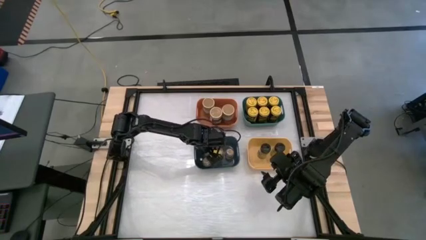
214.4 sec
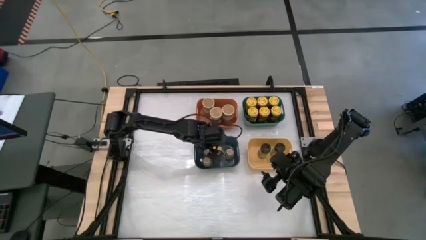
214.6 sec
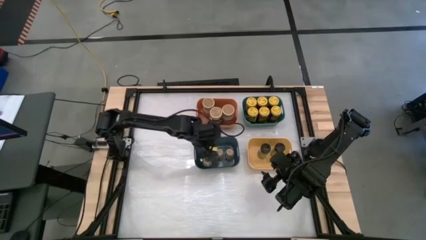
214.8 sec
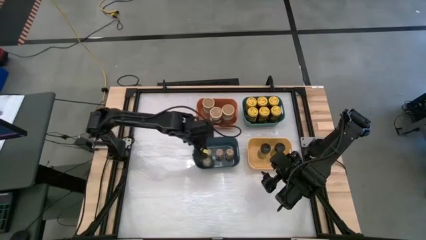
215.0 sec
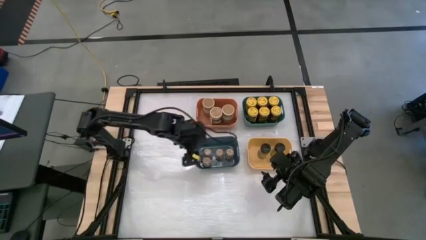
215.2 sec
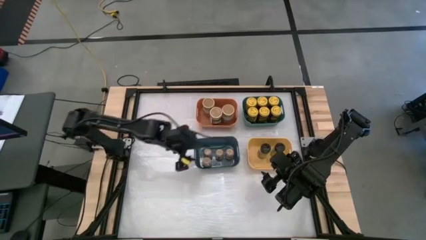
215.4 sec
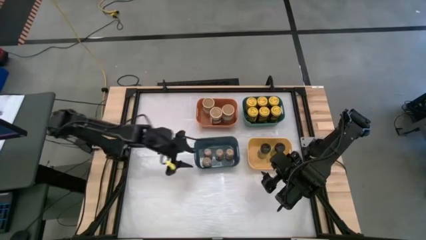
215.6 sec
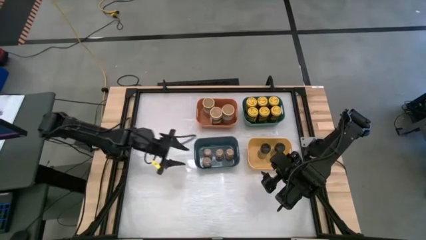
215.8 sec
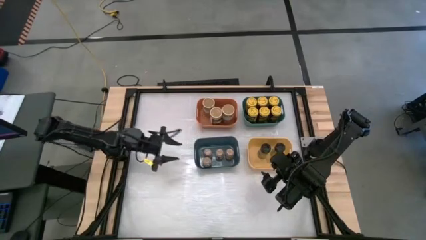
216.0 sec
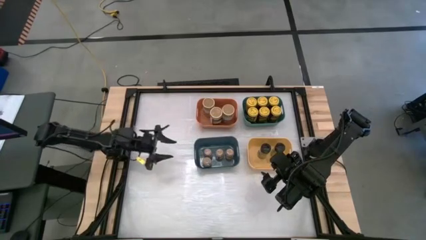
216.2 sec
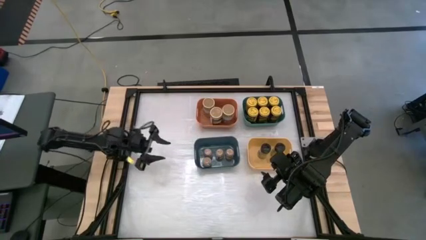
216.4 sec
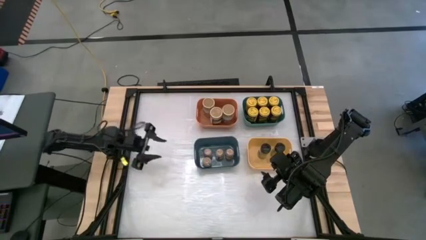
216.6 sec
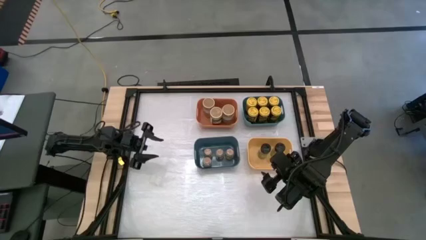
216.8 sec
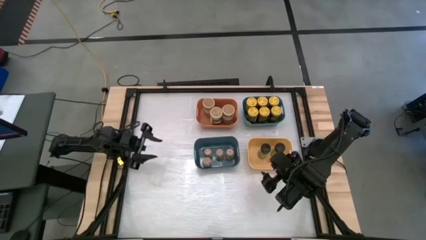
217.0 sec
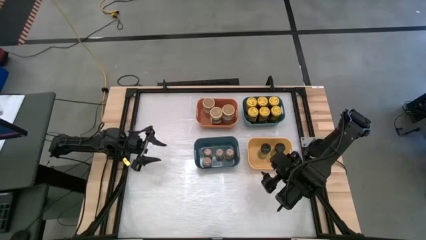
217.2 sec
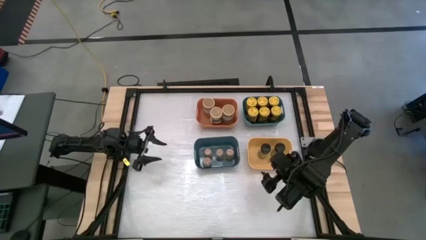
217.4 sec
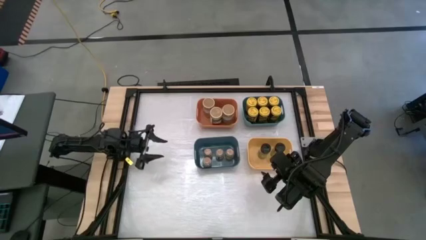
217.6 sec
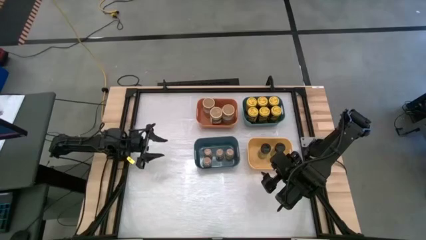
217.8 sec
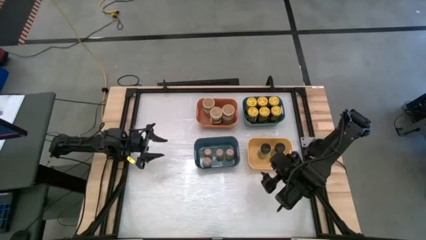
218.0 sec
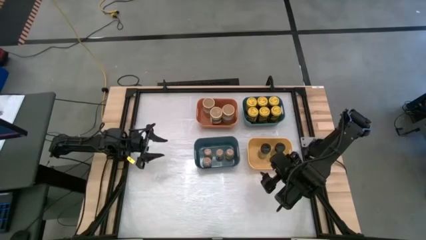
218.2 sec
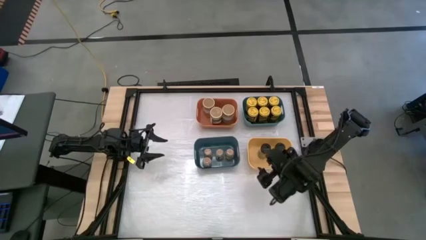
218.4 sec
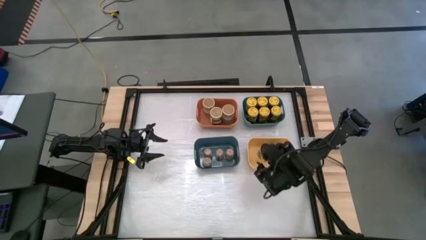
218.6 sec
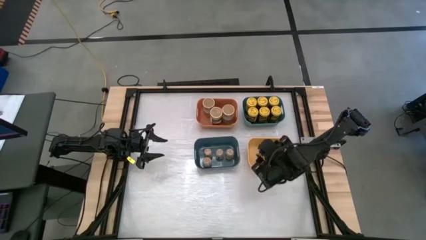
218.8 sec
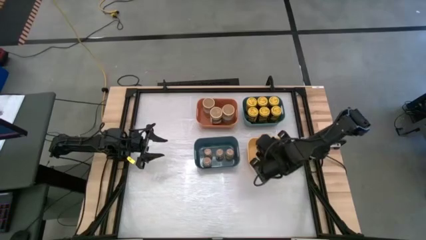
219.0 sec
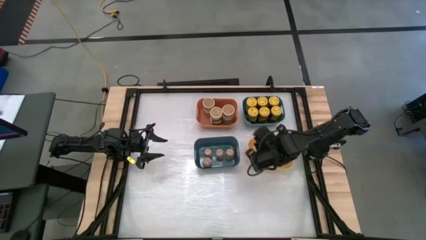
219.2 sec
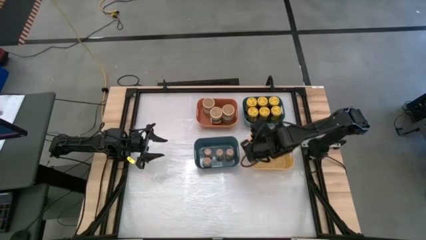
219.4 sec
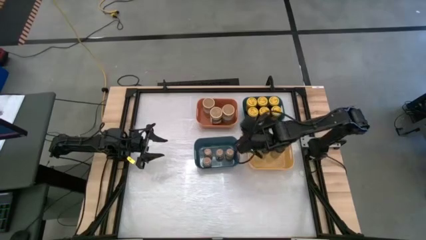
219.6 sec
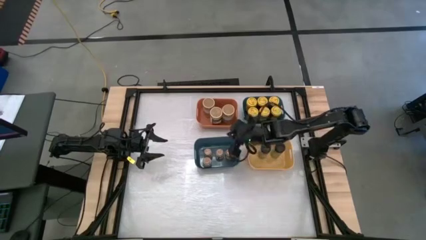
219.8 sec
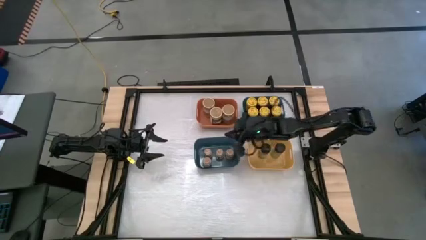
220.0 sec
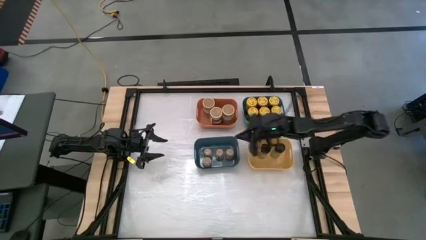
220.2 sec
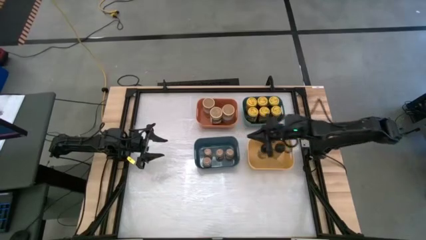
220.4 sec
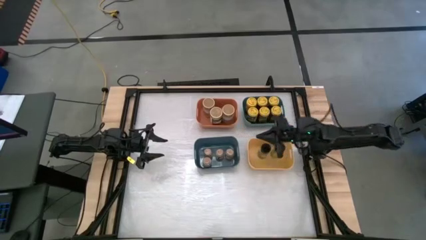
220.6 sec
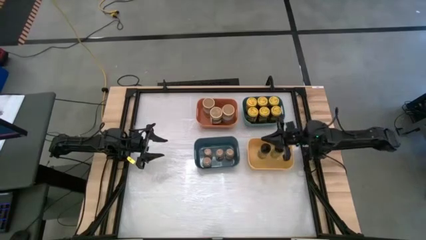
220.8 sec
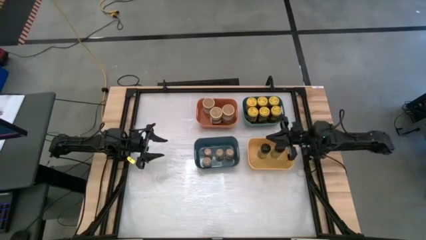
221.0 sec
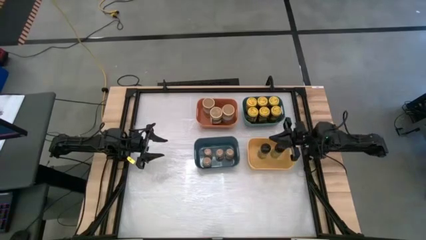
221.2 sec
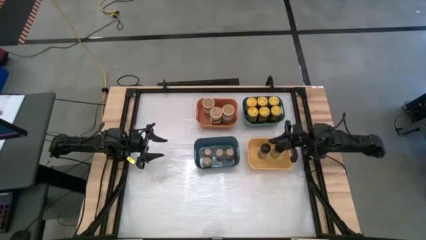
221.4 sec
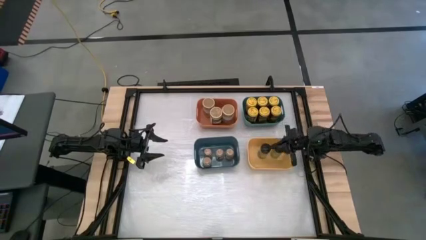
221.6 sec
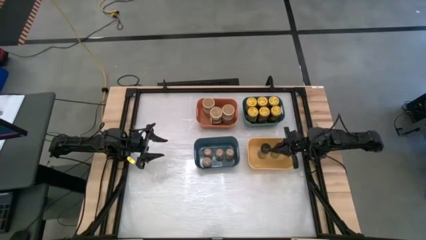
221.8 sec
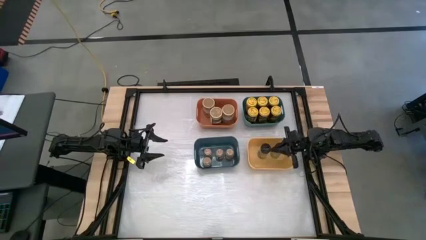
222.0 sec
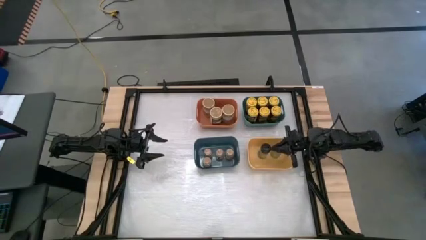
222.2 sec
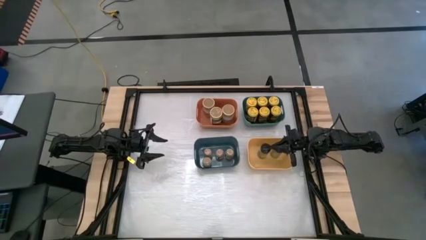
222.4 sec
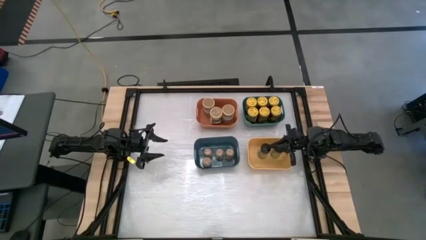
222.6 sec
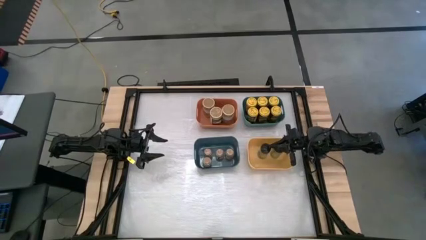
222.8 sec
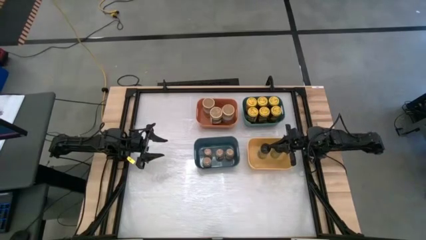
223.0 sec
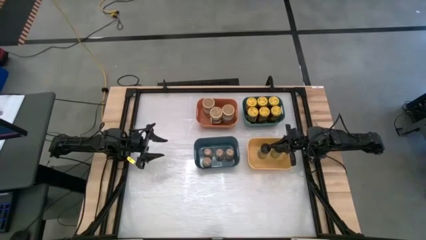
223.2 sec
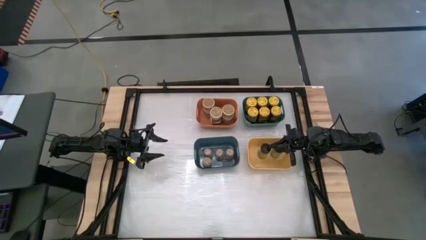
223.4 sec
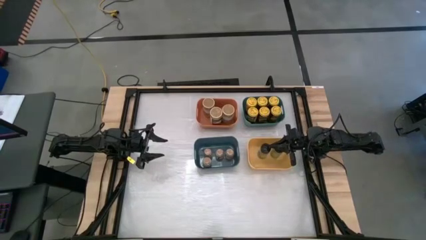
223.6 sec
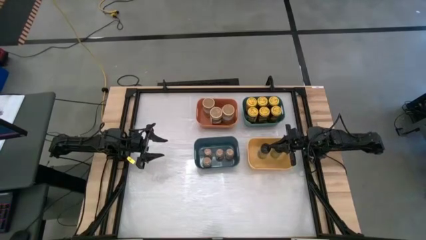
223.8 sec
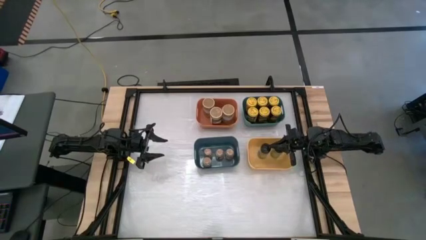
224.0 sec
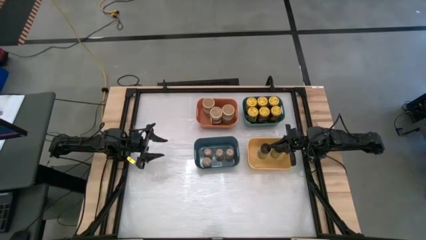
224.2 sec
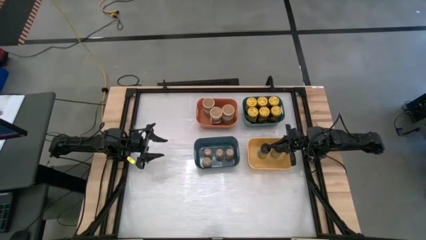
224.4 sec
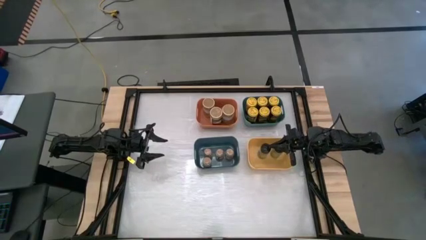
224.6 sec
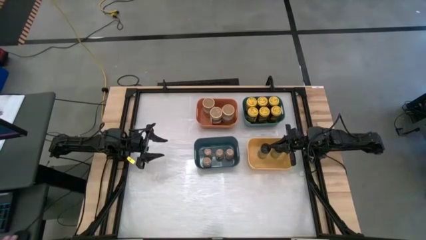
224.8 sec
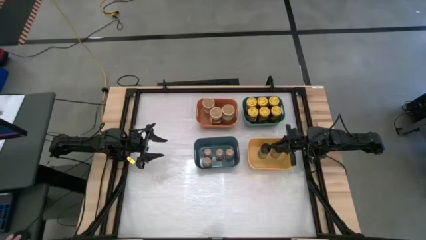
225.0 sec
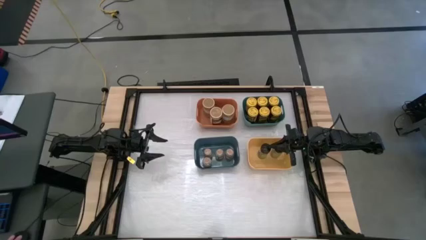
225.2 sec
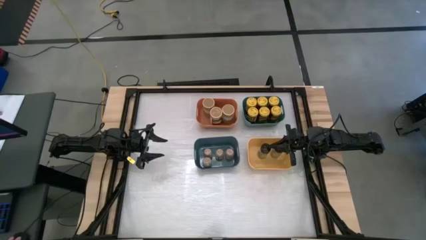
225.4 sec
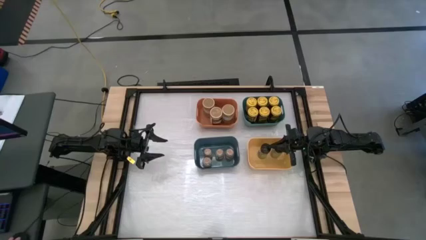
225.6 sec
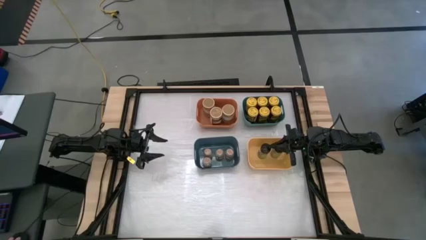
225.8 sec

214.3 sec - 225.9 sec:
Task: Sort spices by type
Return to Home Position

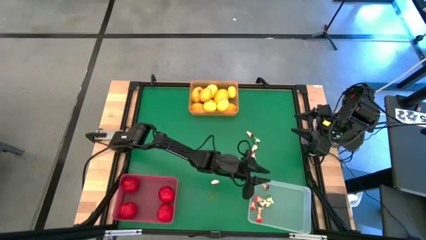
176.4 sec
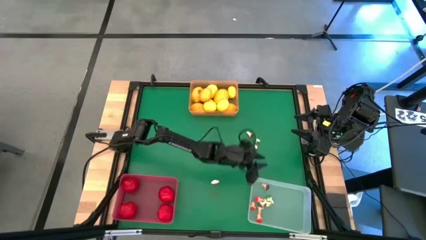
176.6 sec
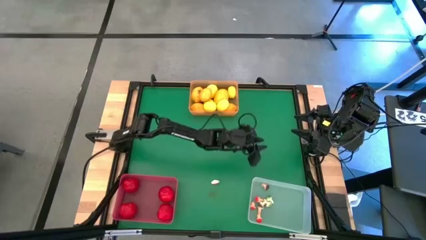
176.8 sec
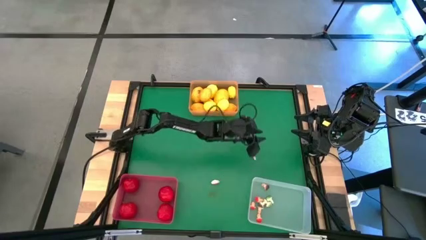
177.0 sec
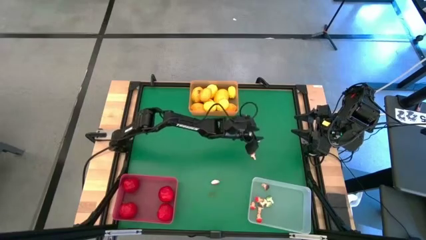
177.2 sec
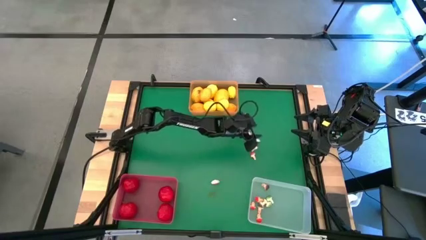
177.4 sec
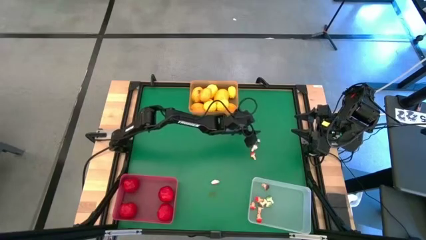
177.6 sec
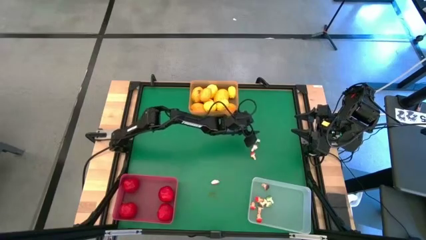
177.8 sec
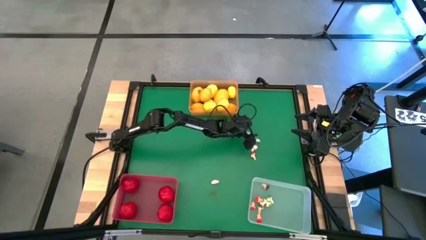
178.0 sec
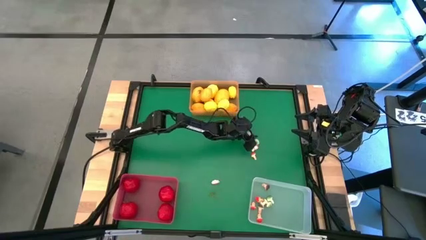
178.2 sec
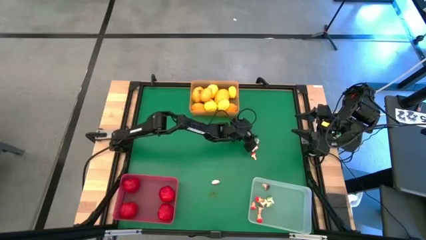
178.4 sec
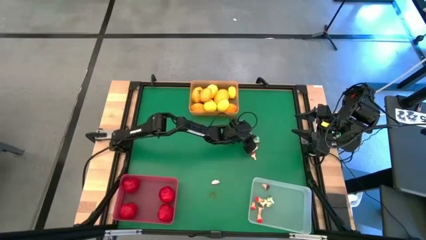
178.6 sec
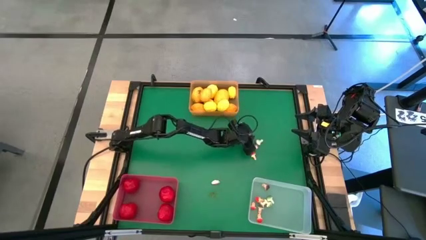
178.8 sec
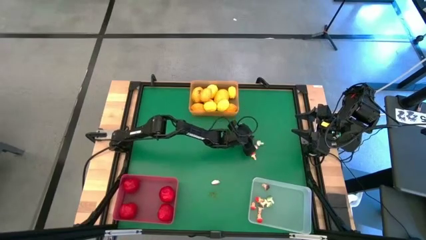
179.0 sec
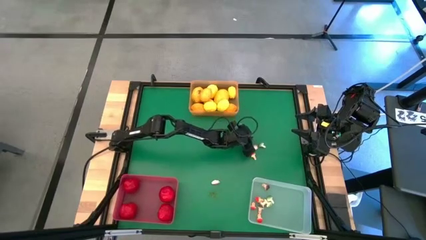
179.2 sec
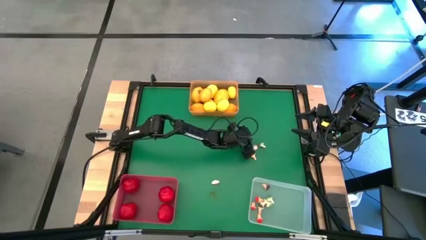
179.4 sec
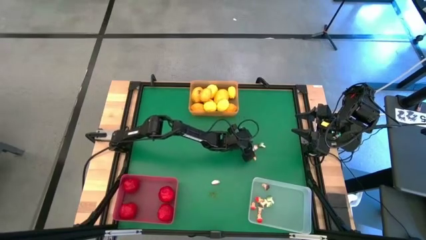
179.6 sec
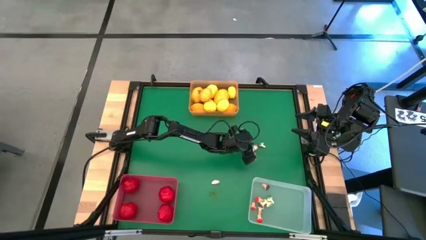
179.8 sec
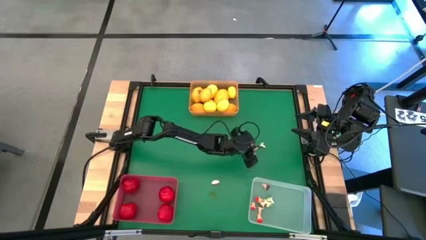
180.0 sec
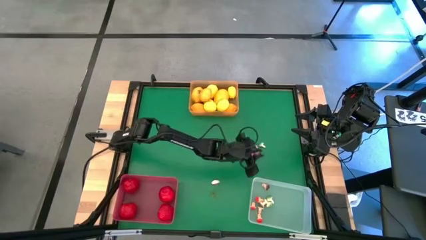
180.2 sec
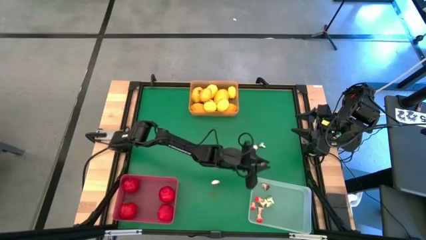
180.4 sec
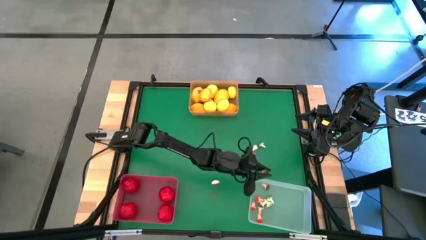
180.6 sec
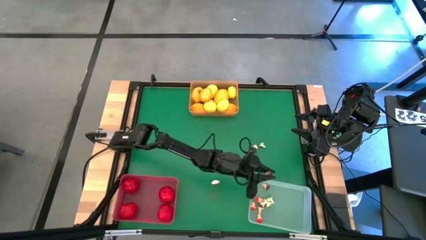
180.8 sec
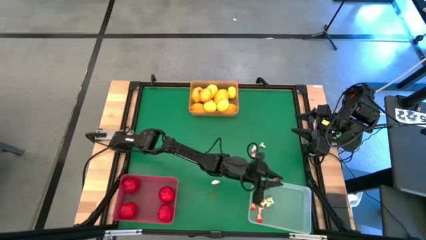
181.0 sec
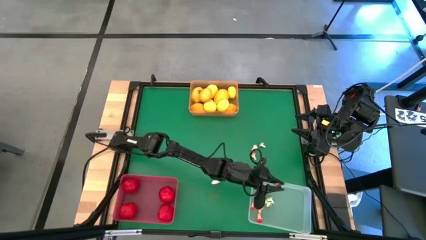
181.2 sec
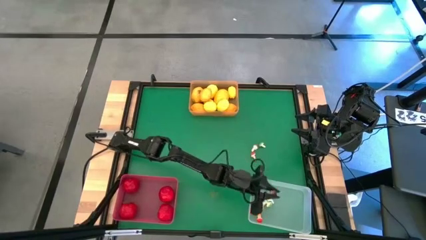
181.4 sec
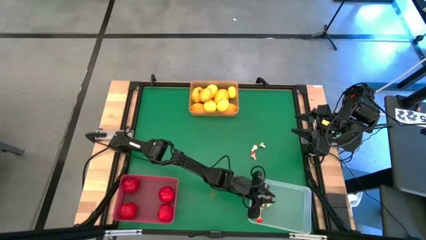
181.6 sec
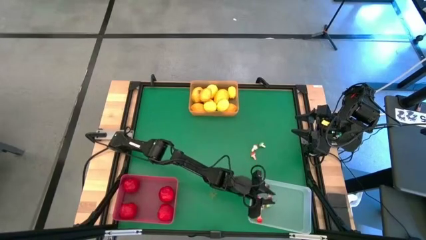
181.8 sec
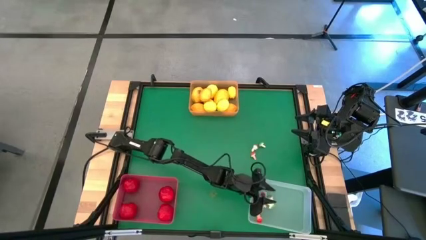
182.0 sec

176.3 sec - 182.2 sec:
Task: Sort produce into baskets
Put the brown mushroom into the transparent bin

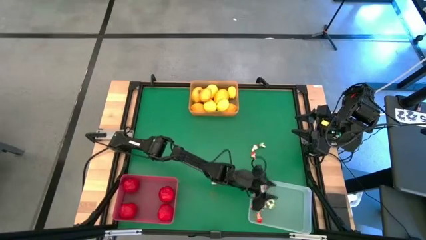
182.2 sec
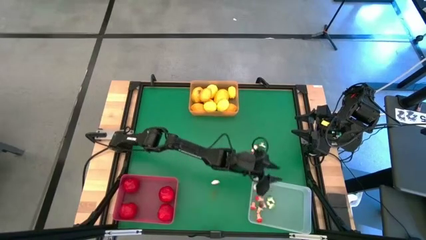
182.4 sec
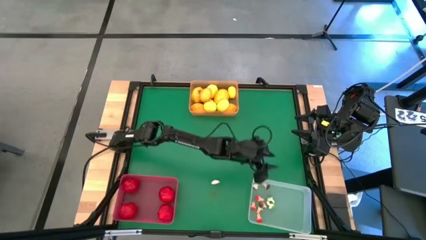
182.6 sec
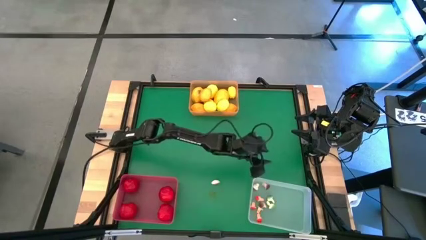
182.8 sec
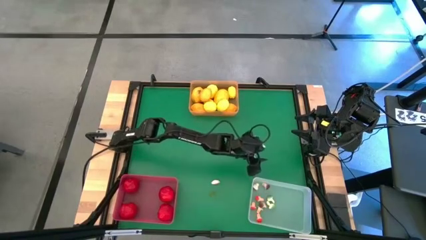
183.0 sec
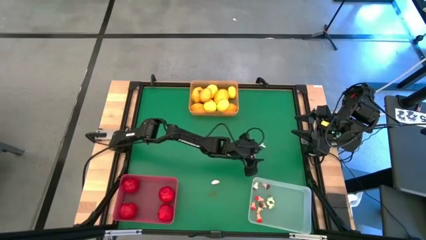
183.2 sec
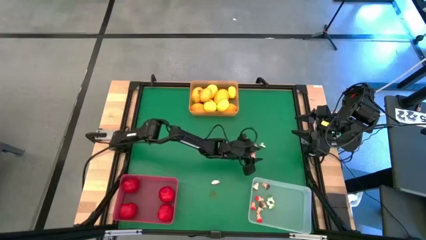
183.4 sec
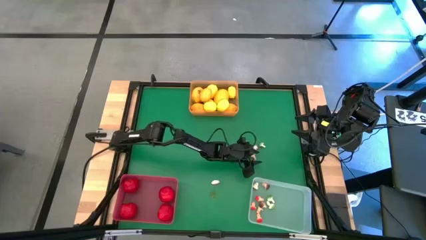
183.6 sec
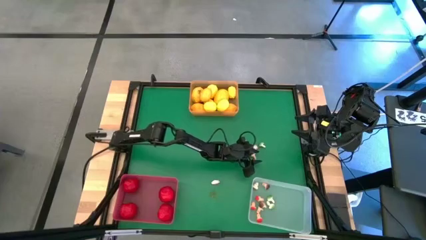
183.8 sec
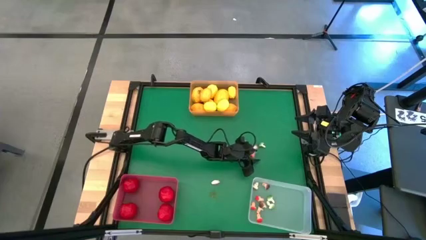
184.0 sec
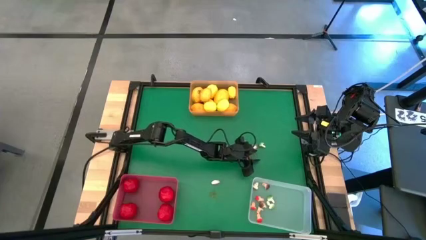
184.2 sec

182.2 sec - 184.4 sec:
Put the red mushroom into the transparent bin
